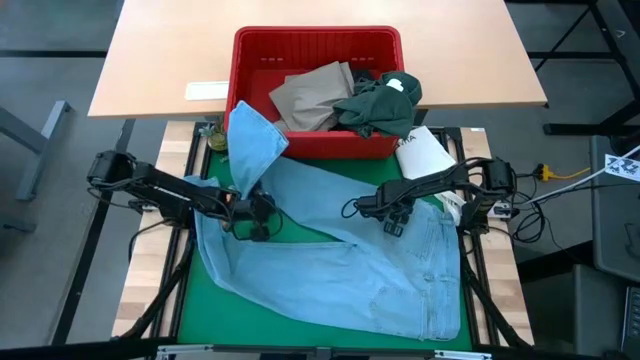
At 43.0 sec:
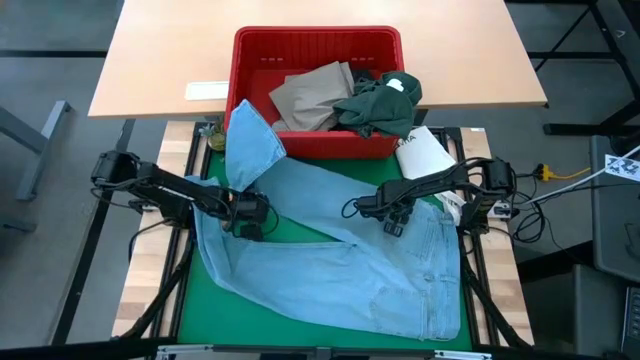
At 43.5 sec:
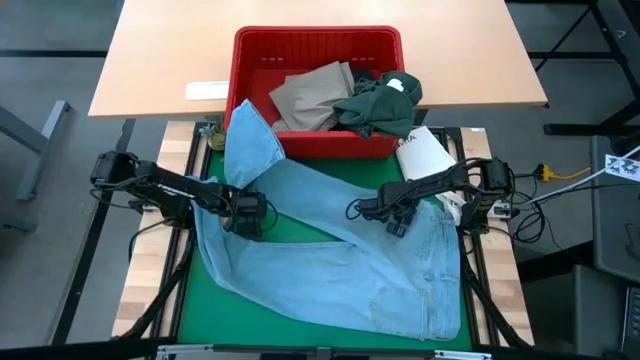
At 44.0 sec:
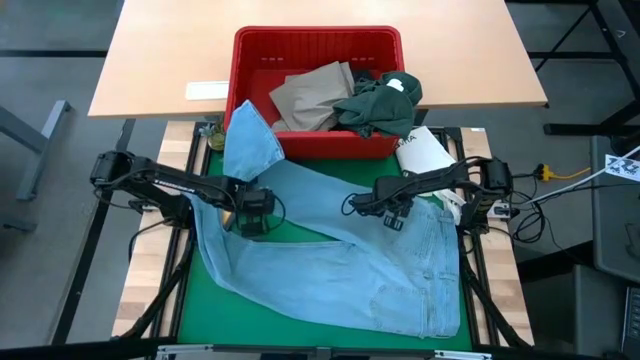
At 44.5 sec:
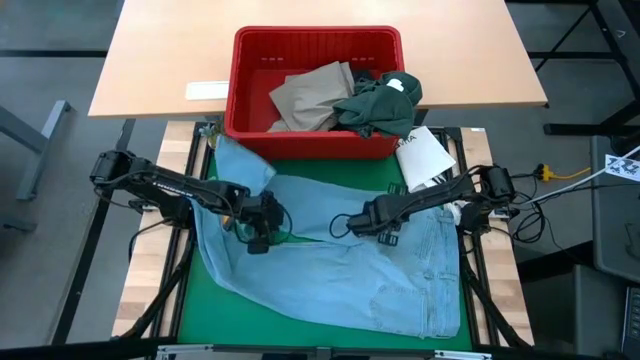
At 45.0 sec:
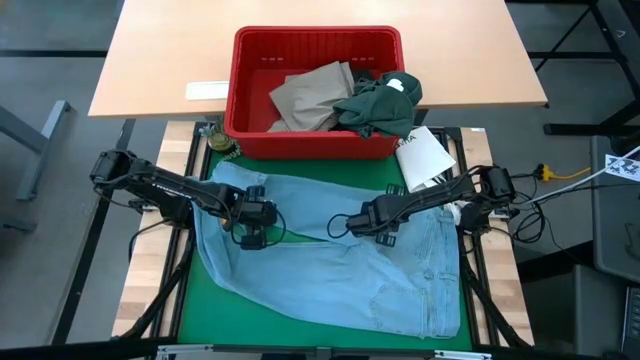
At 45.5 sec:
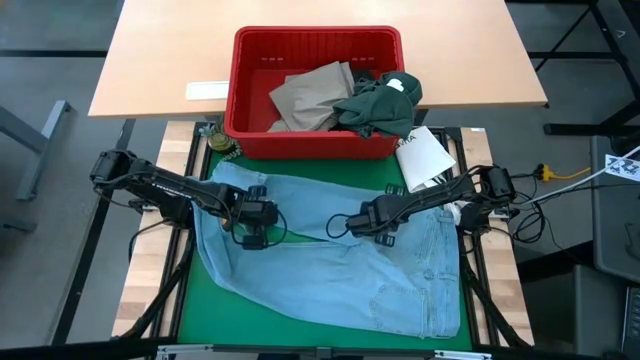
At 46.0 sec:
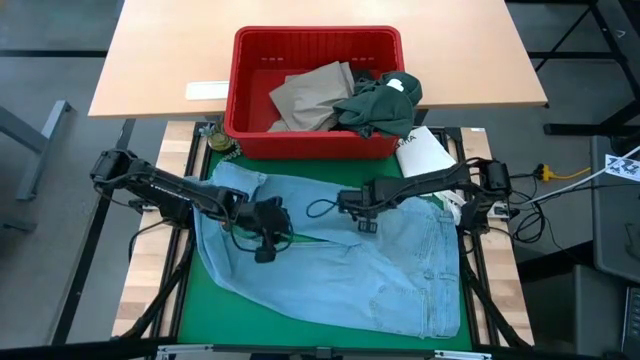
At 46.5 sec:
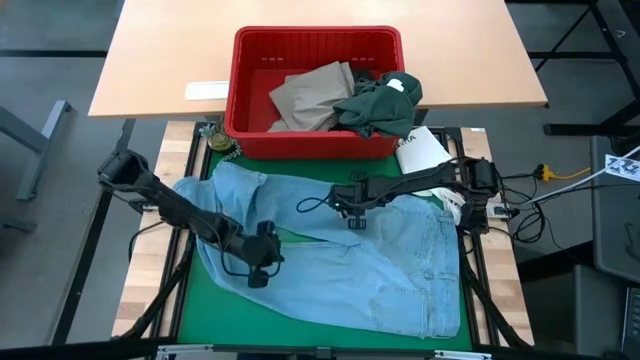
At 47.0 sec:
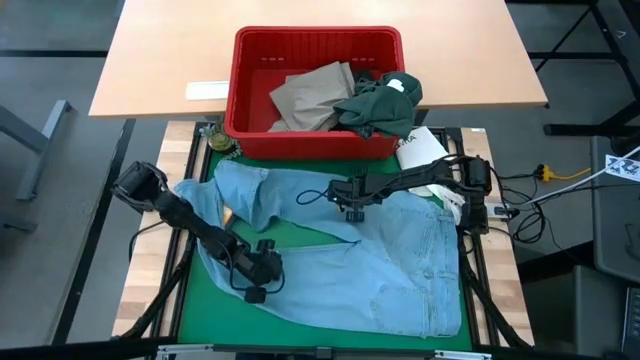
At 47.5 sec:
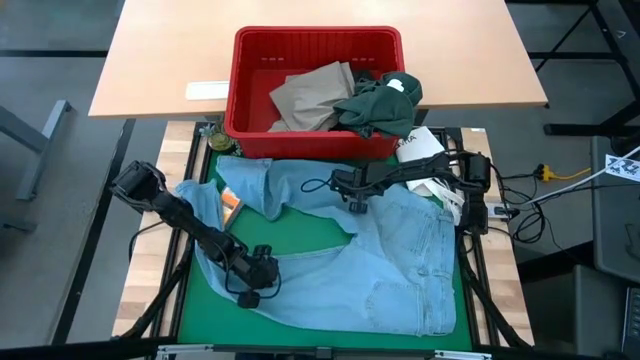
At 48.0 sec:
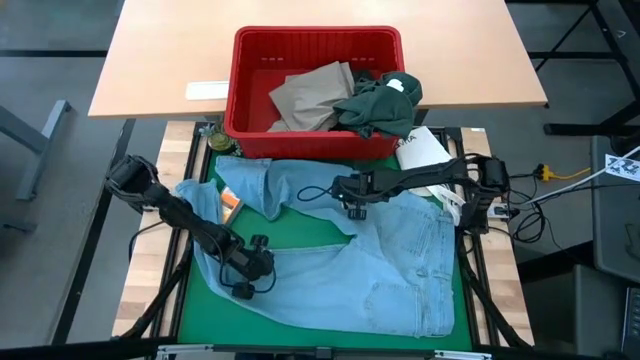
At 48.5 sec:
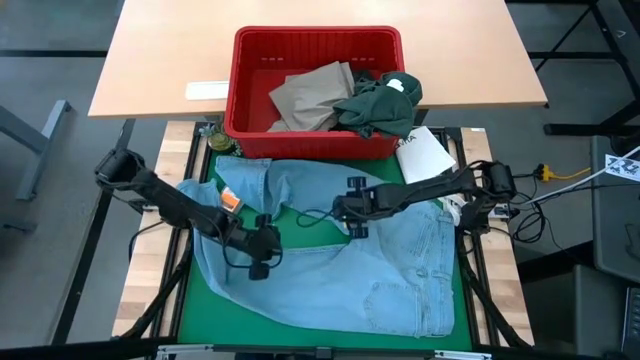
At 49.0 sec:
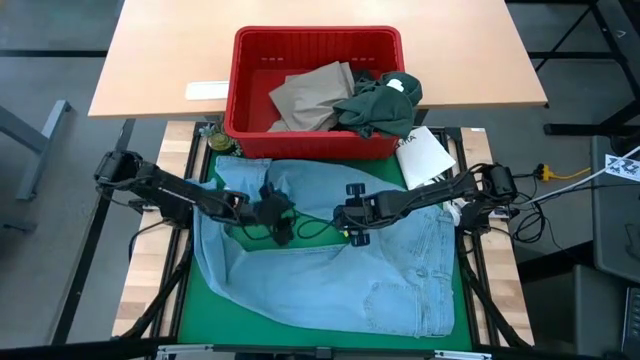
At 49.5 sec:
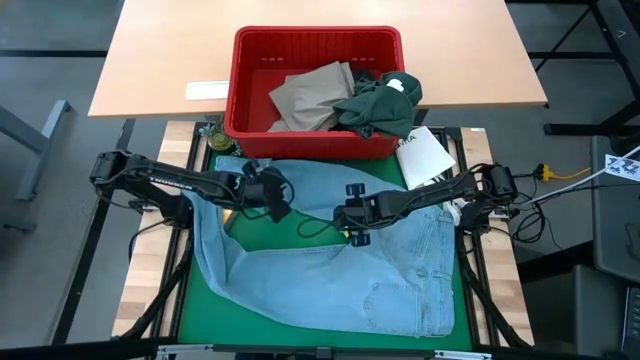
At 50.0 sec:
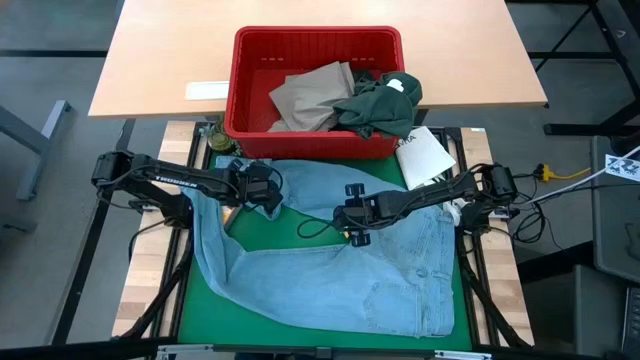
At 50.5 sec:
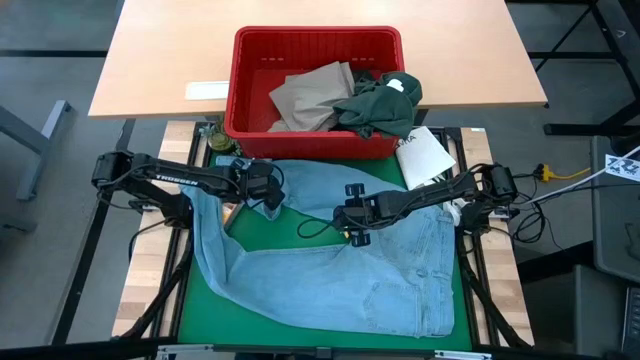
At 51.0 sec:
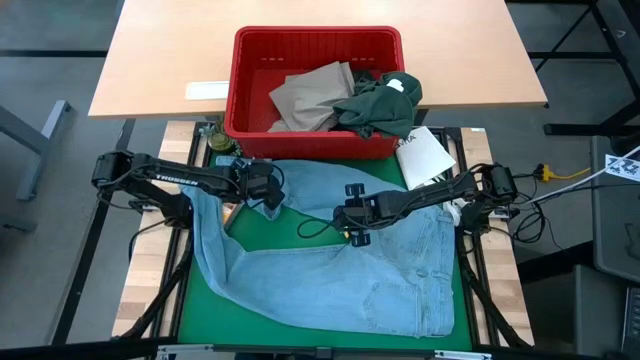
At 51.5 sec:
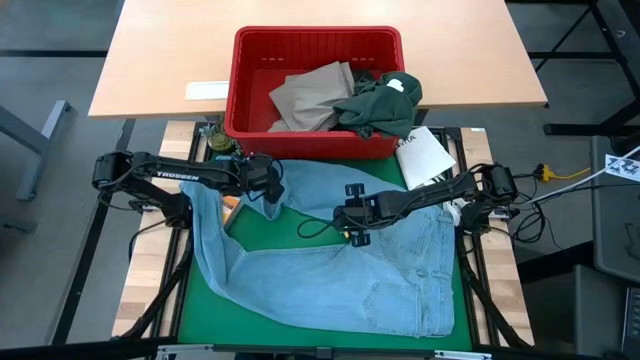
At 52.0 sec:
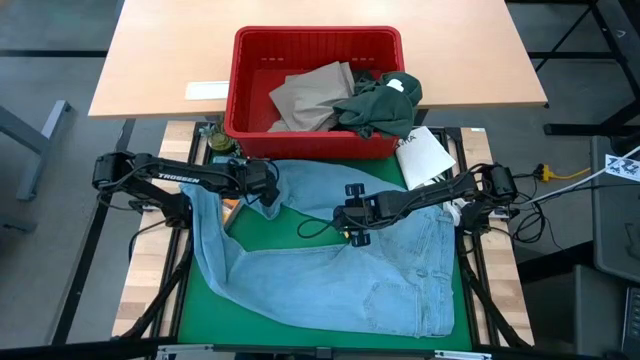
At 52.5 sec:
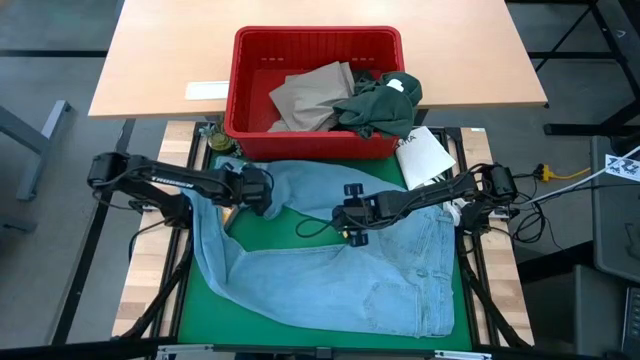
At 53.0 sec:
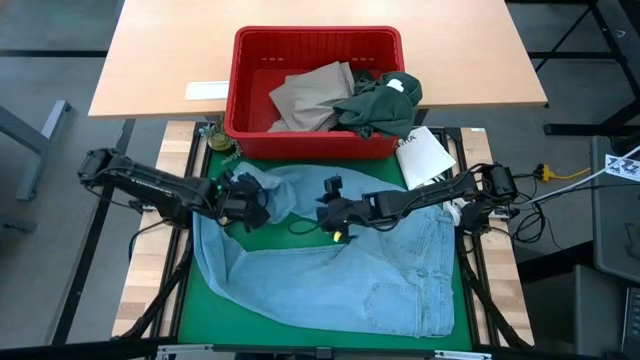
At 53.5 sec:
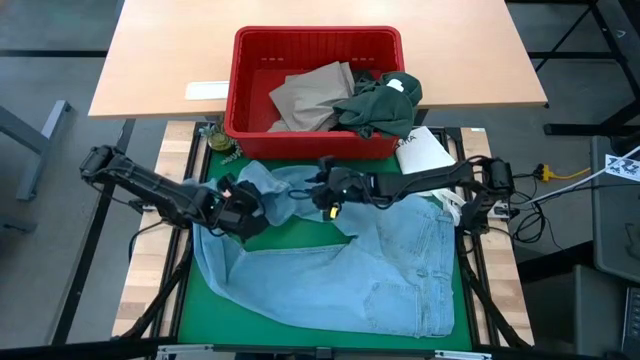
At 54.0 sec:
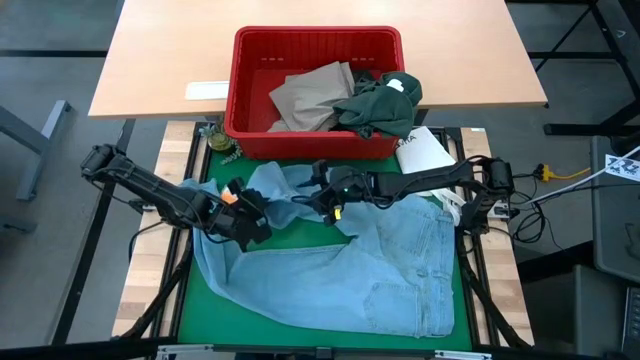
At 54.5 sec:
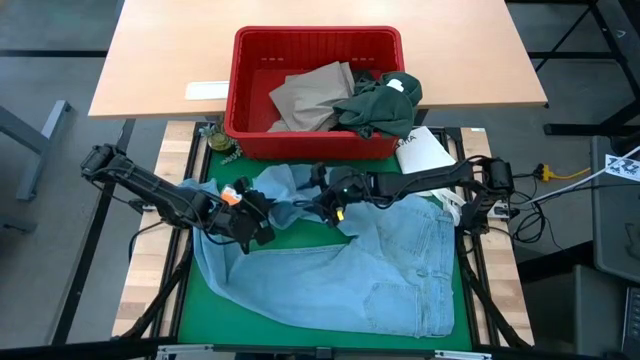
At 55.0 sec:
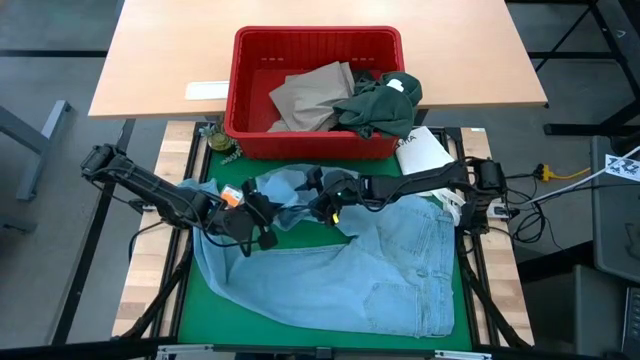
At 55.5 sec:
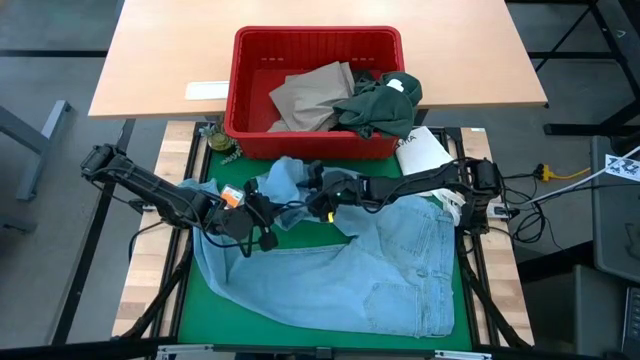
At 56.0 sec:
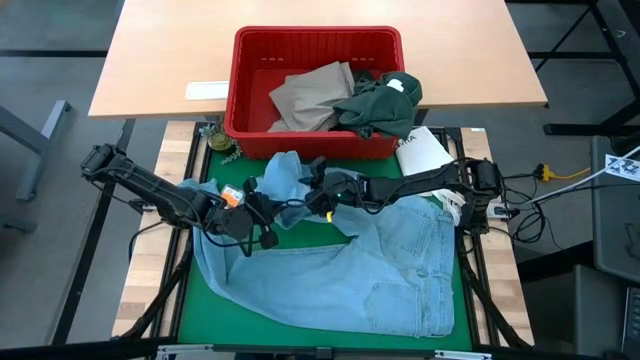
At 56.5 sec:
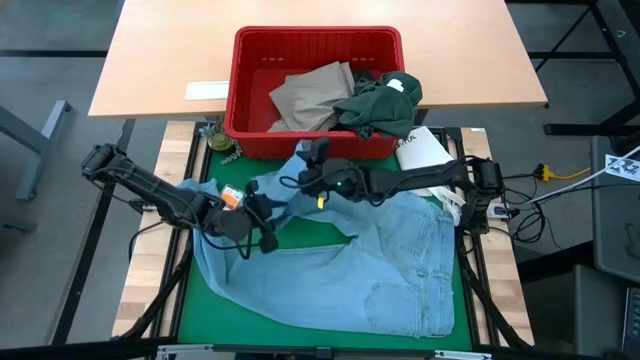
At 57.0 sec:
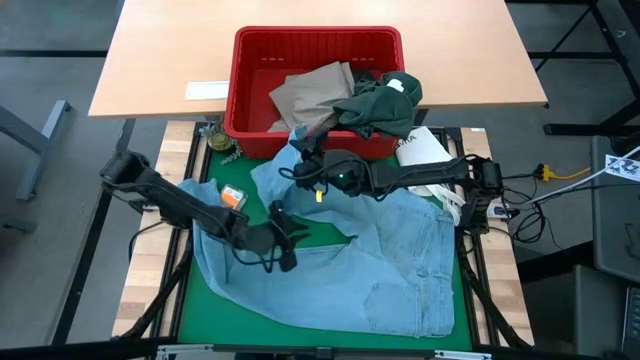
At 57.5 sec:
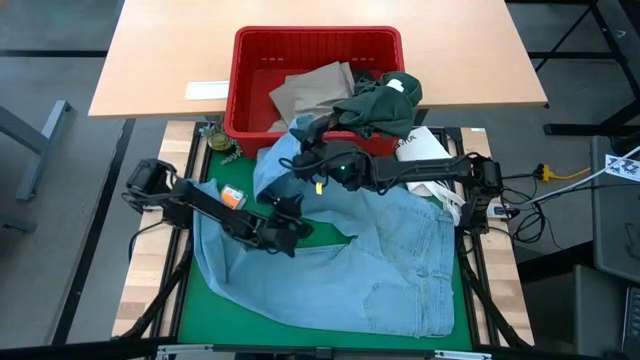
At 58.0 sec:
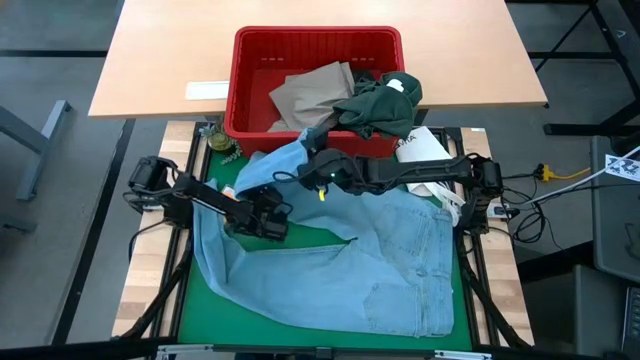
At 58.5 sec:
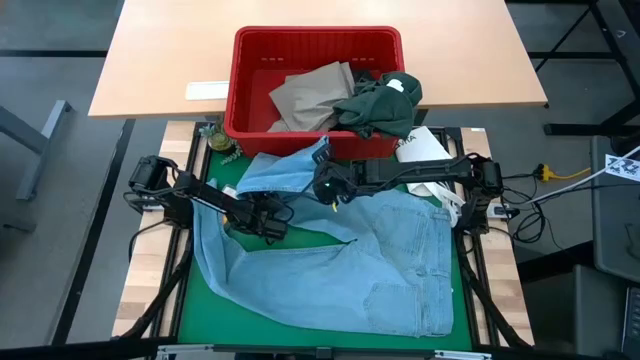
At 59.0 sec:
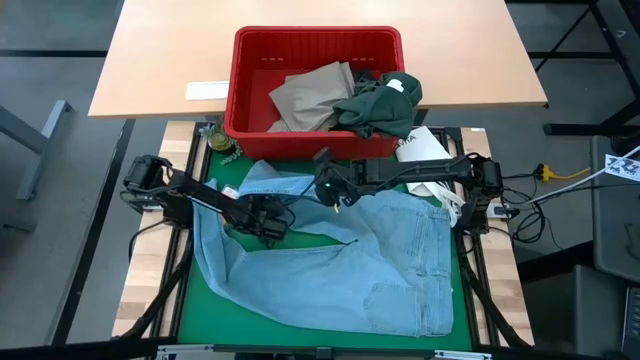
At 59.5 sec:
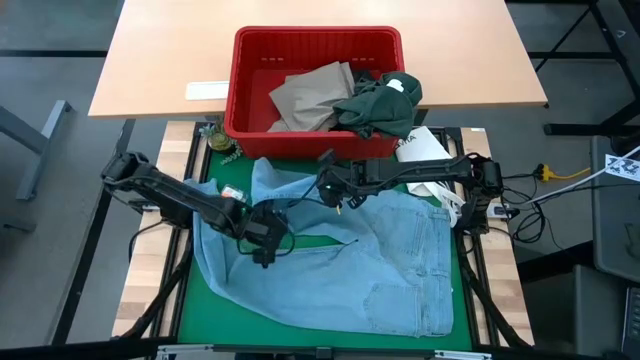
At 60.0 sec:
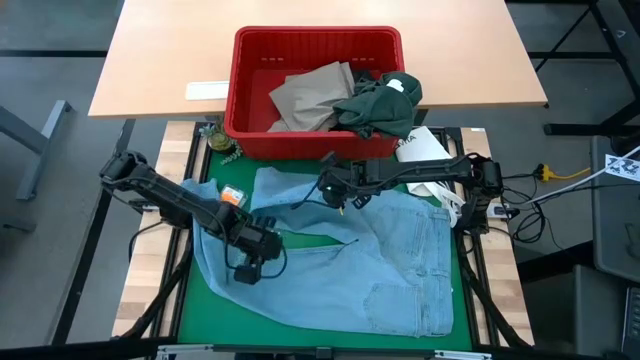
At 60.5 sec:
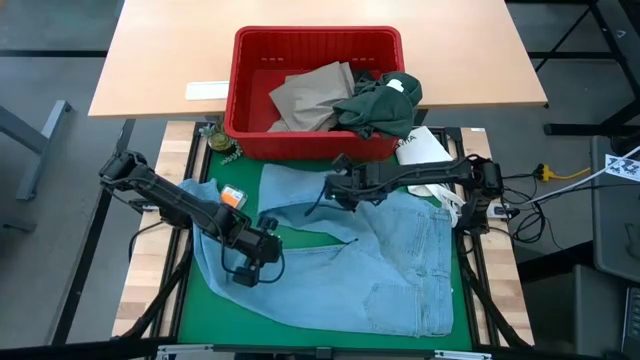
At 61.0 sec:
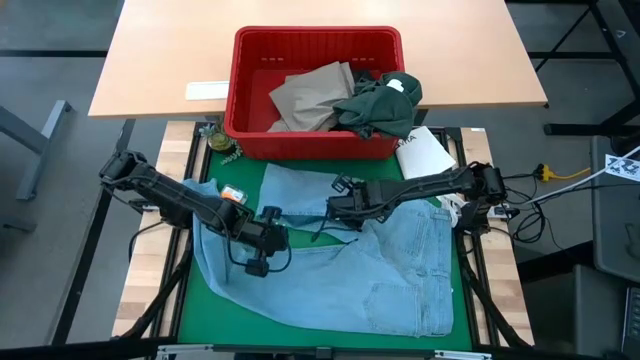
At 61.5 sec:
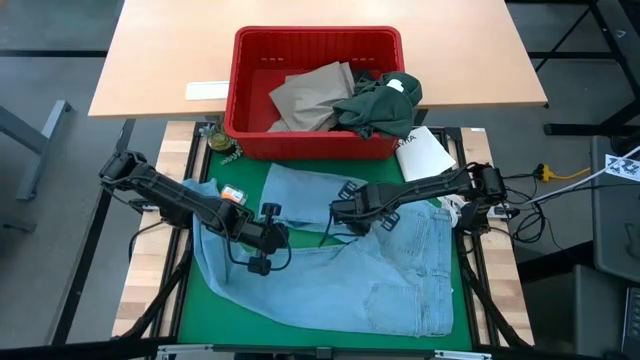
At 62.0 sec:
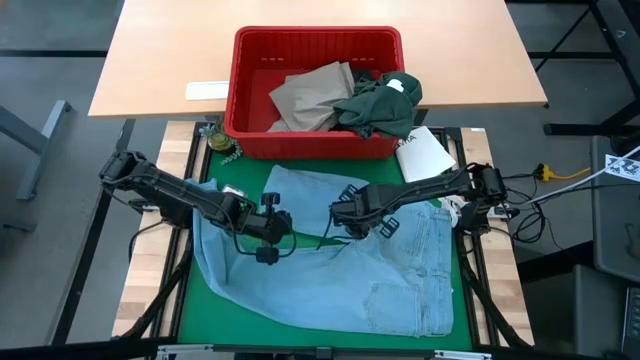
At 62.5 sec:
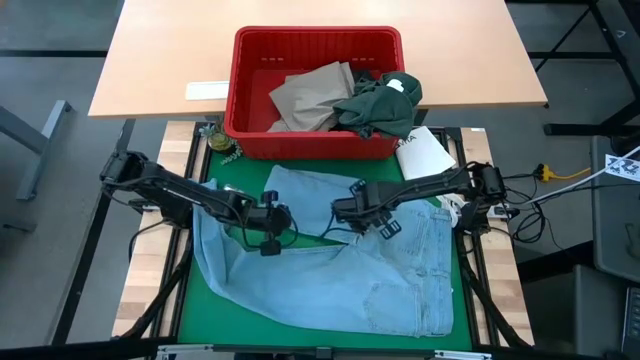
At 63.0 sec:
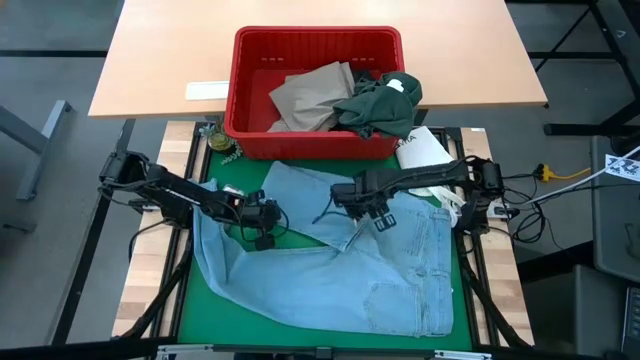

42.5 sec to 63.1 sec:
Task: Fold Laundry from Bin
Fold the blue pants
